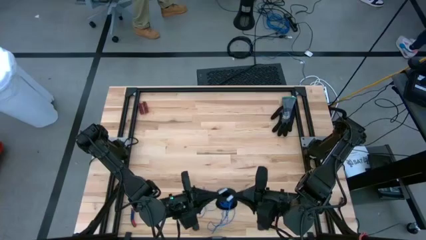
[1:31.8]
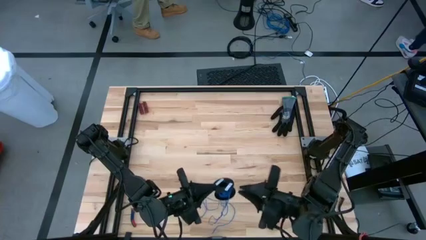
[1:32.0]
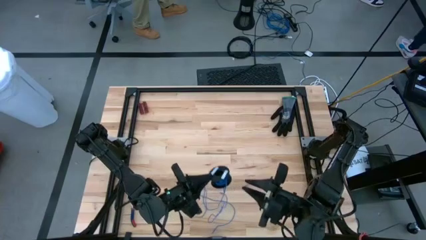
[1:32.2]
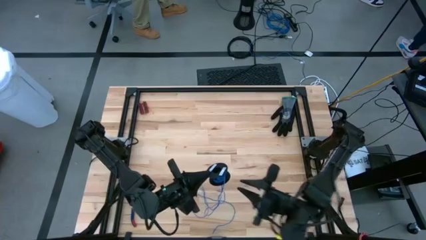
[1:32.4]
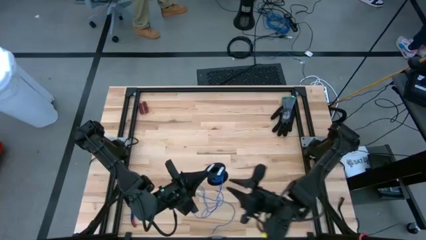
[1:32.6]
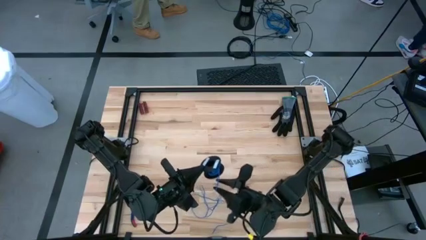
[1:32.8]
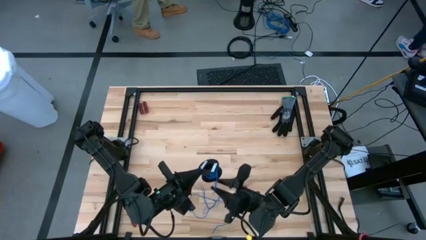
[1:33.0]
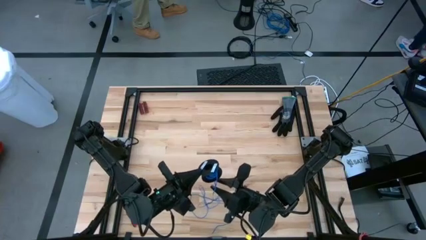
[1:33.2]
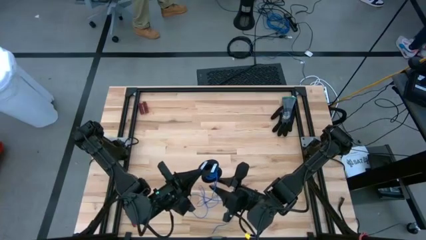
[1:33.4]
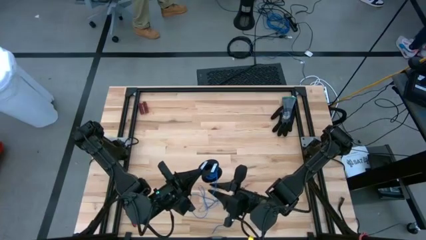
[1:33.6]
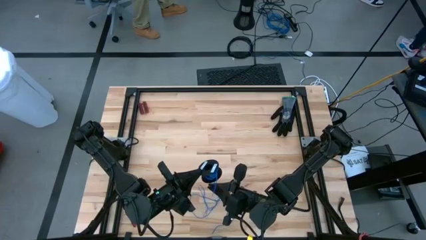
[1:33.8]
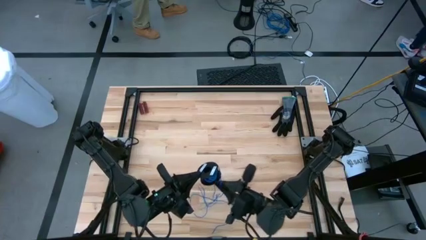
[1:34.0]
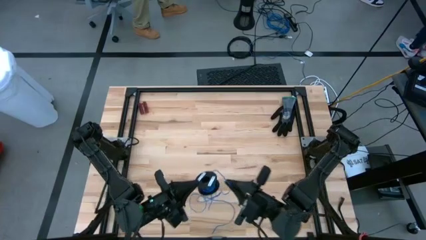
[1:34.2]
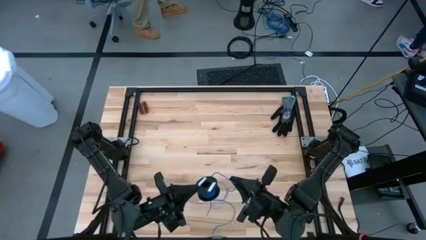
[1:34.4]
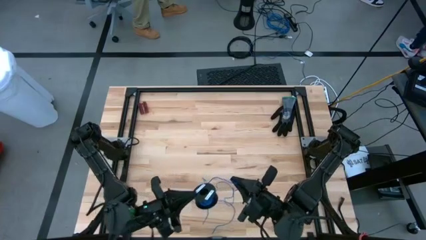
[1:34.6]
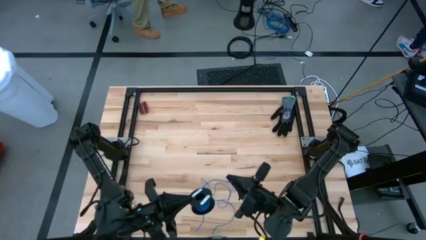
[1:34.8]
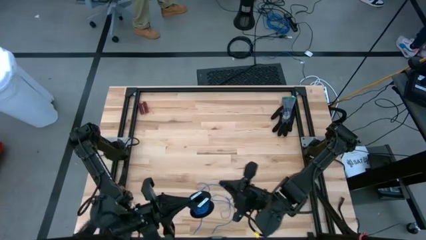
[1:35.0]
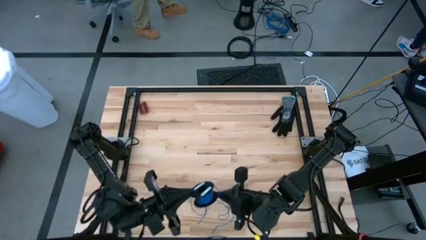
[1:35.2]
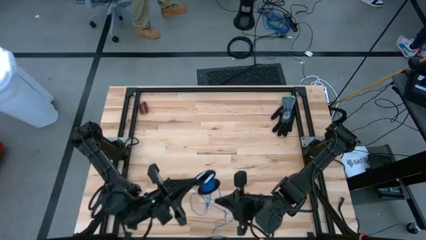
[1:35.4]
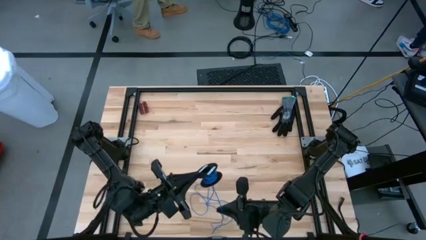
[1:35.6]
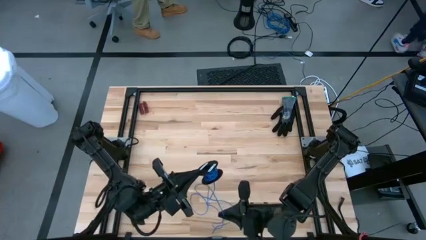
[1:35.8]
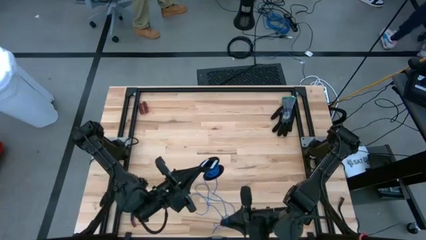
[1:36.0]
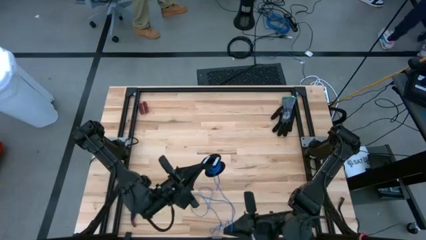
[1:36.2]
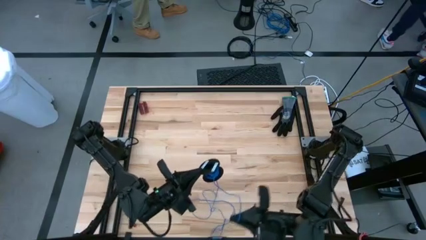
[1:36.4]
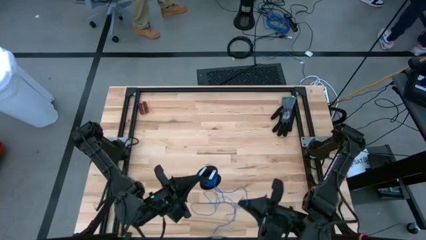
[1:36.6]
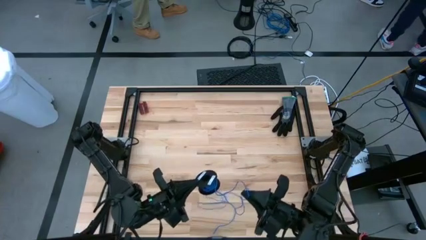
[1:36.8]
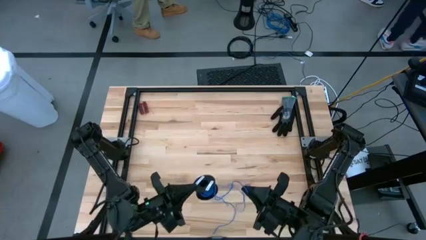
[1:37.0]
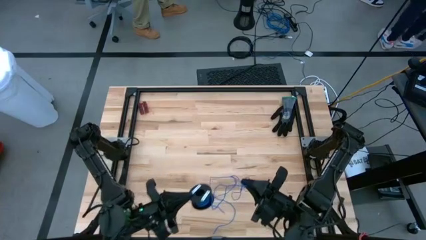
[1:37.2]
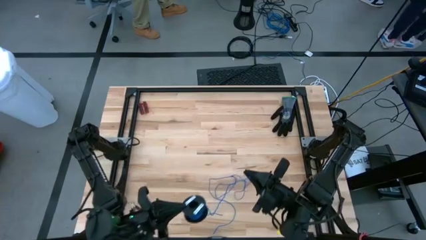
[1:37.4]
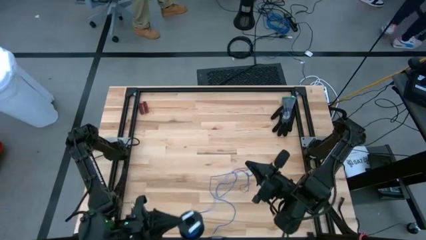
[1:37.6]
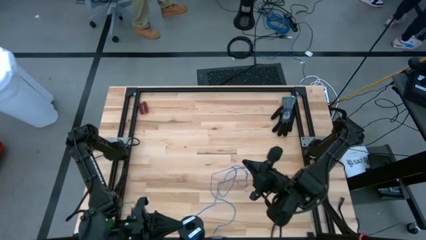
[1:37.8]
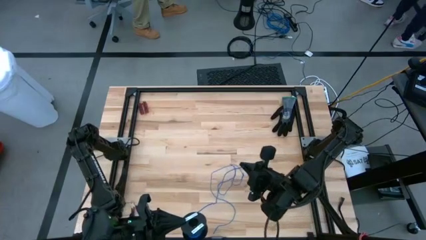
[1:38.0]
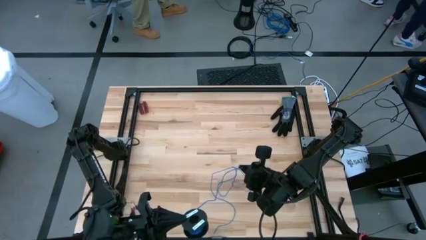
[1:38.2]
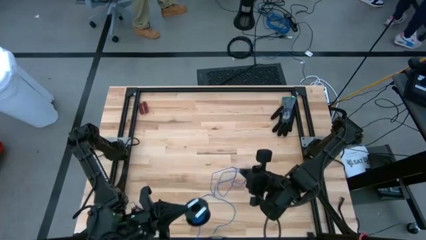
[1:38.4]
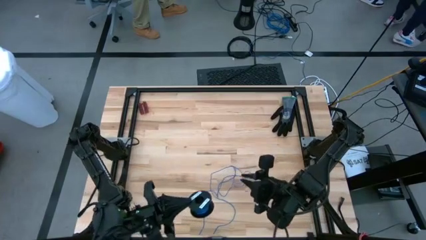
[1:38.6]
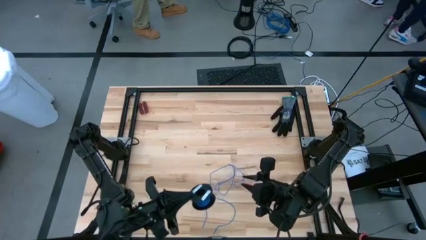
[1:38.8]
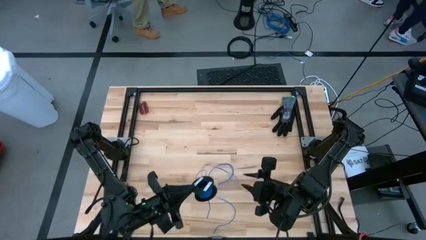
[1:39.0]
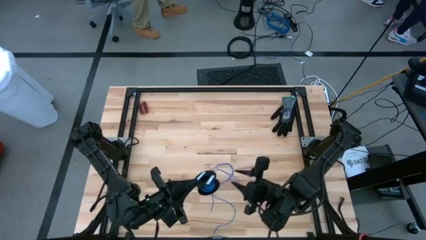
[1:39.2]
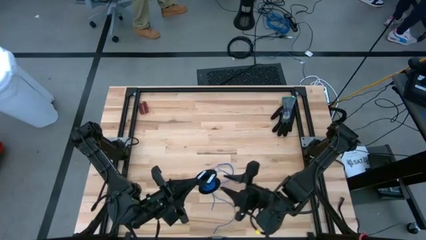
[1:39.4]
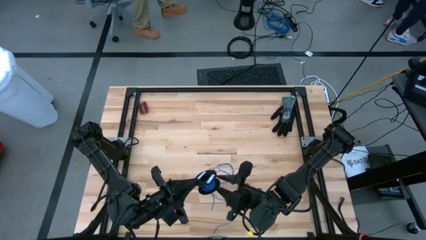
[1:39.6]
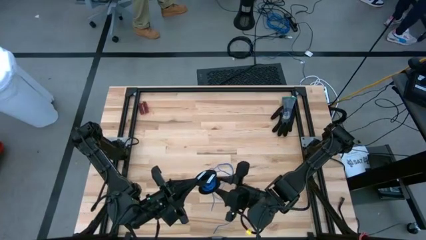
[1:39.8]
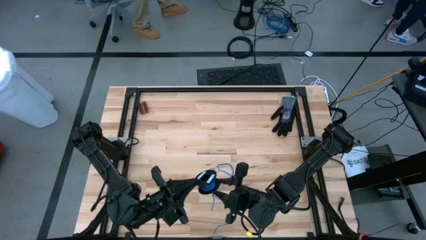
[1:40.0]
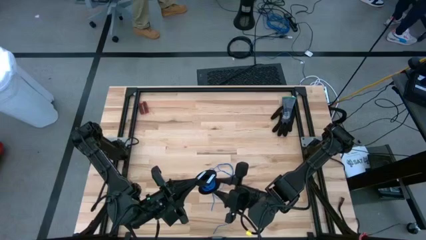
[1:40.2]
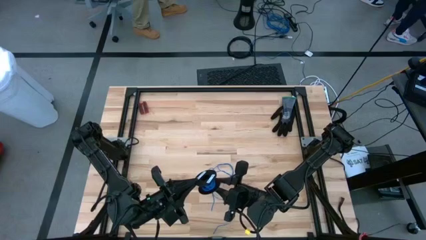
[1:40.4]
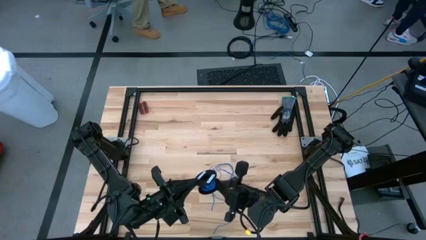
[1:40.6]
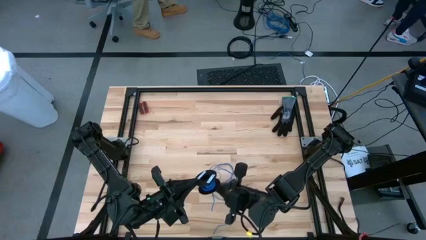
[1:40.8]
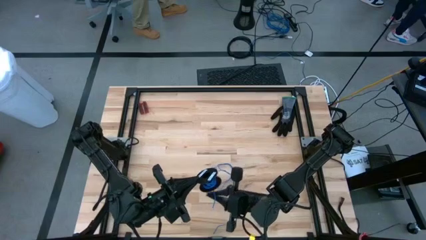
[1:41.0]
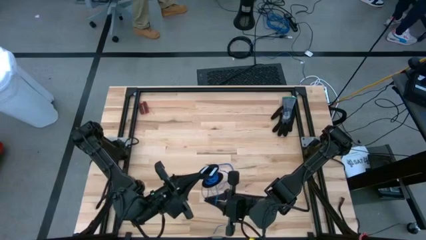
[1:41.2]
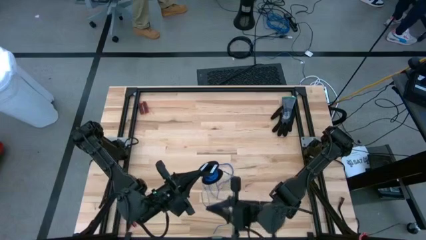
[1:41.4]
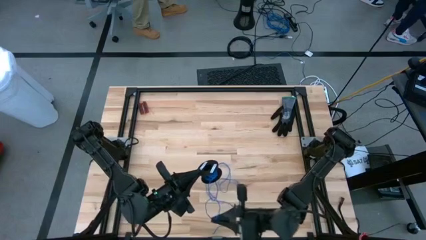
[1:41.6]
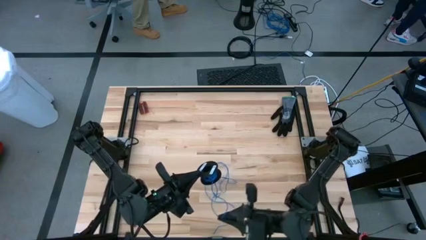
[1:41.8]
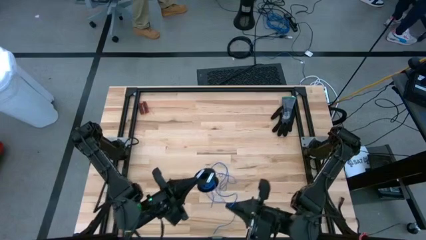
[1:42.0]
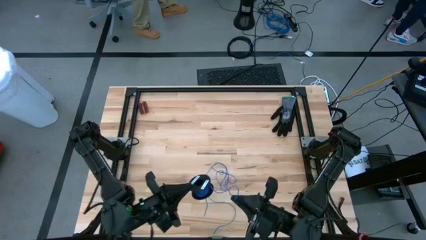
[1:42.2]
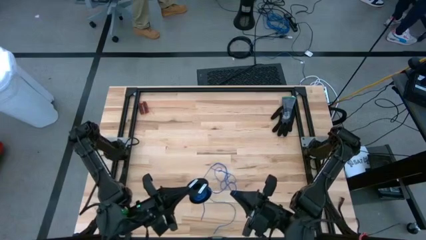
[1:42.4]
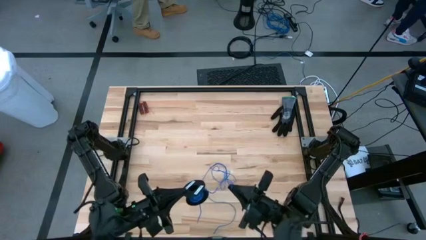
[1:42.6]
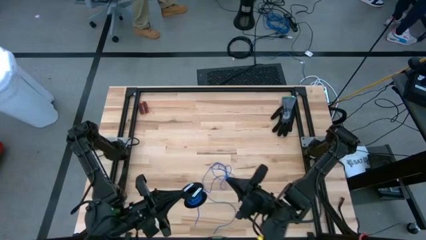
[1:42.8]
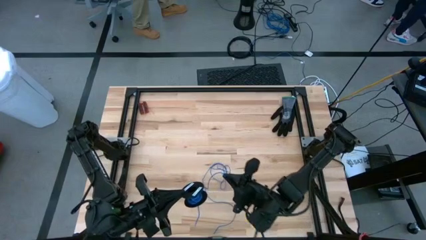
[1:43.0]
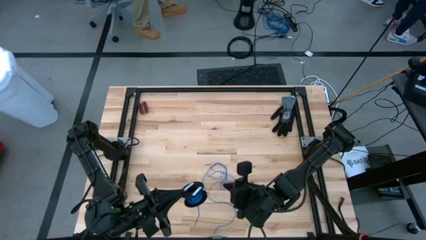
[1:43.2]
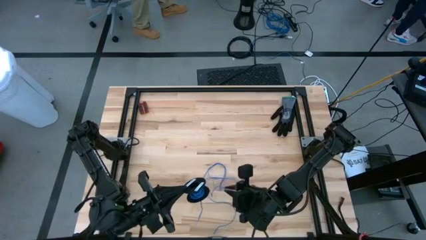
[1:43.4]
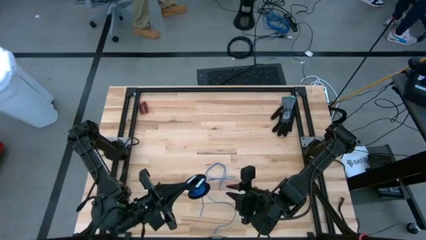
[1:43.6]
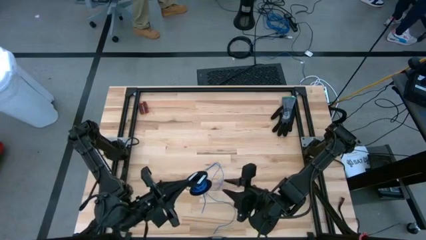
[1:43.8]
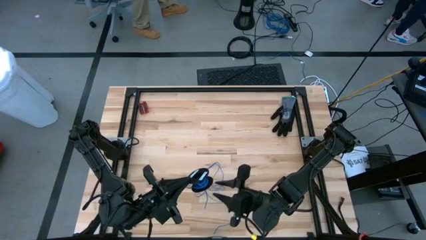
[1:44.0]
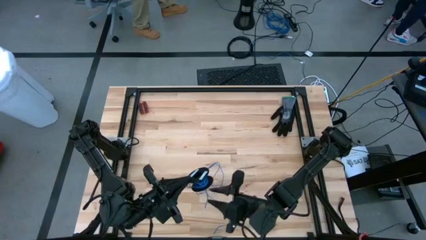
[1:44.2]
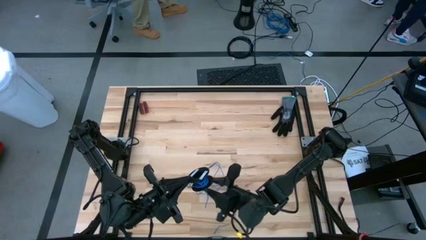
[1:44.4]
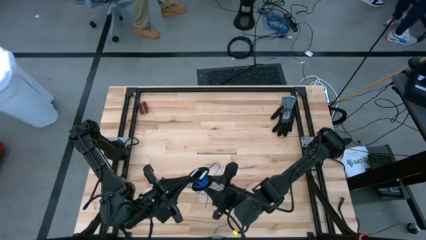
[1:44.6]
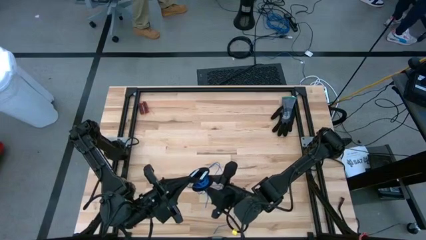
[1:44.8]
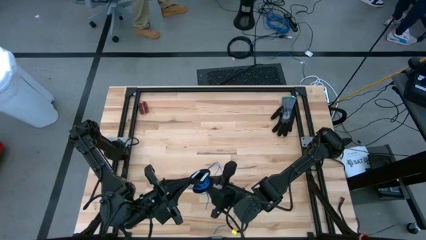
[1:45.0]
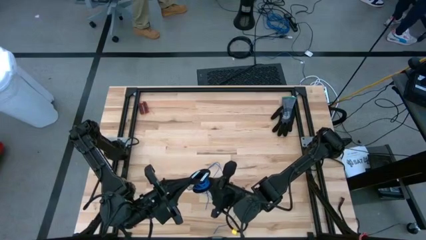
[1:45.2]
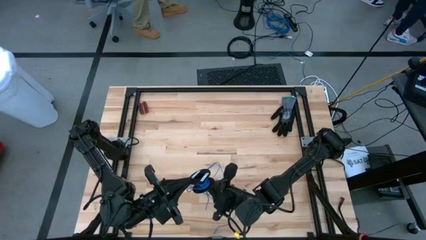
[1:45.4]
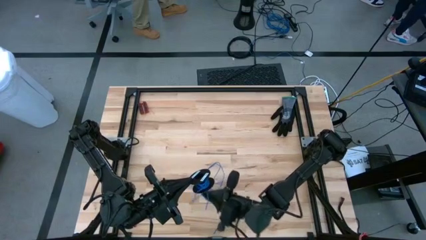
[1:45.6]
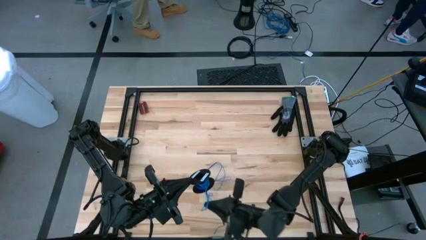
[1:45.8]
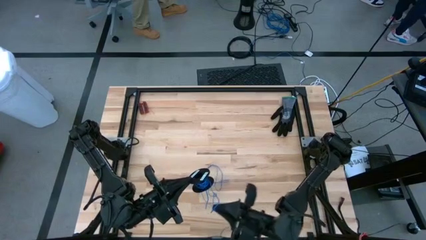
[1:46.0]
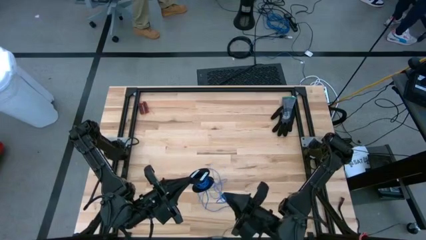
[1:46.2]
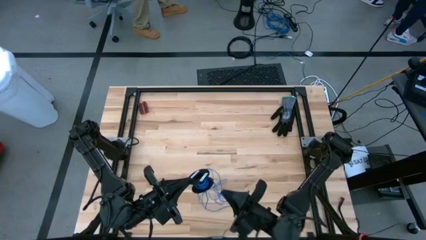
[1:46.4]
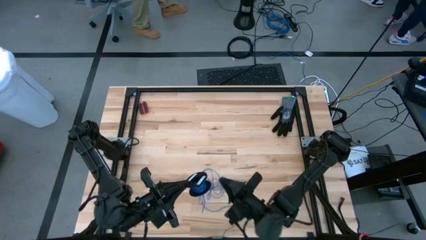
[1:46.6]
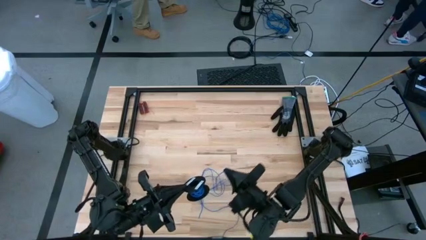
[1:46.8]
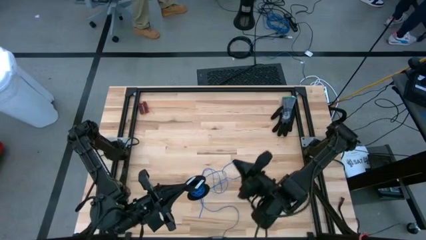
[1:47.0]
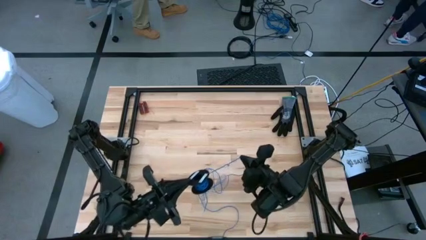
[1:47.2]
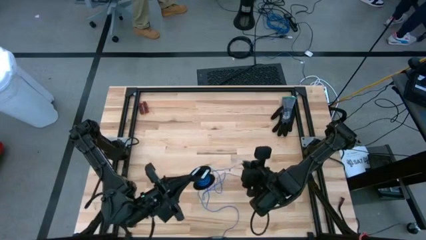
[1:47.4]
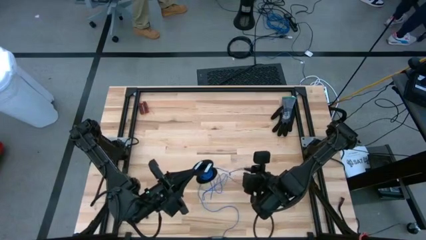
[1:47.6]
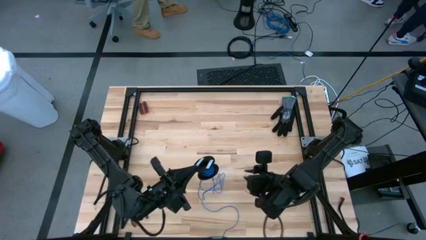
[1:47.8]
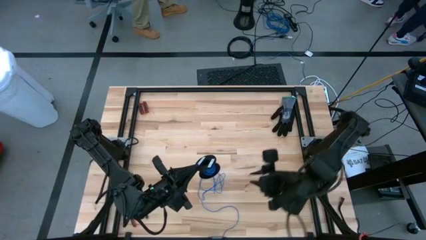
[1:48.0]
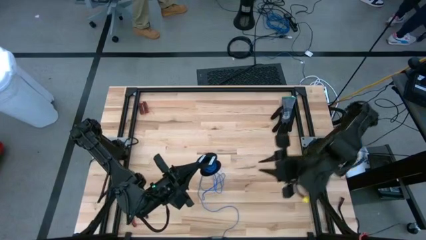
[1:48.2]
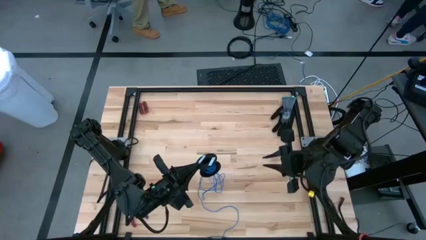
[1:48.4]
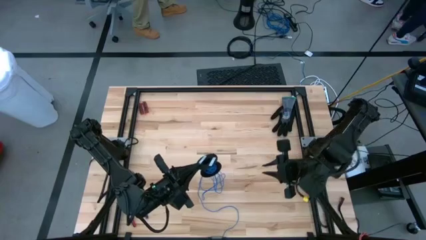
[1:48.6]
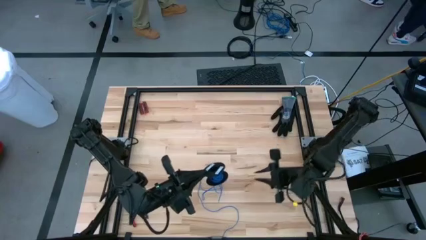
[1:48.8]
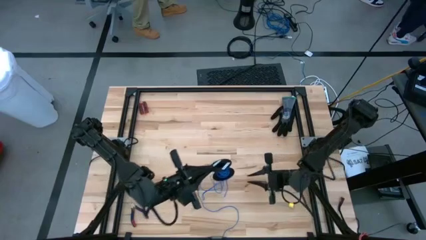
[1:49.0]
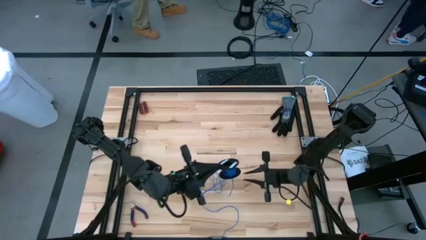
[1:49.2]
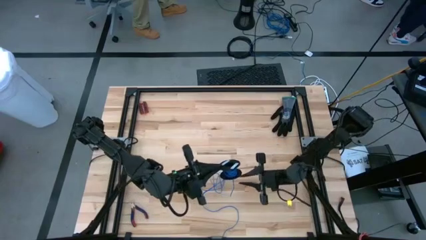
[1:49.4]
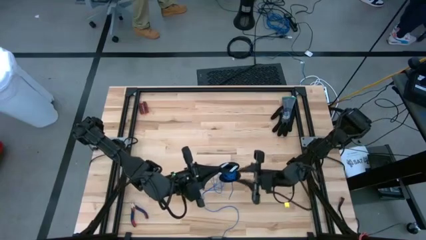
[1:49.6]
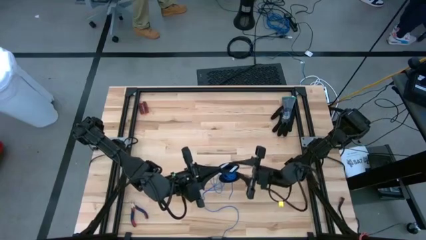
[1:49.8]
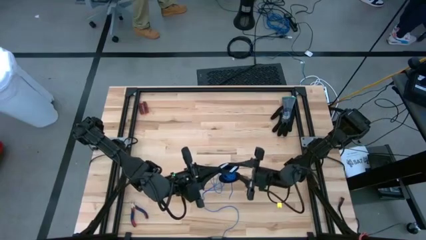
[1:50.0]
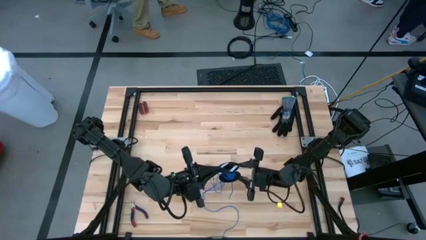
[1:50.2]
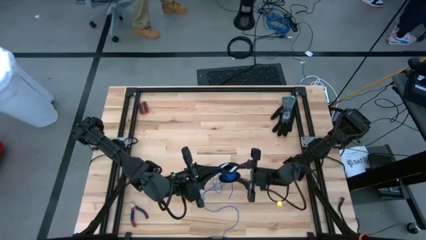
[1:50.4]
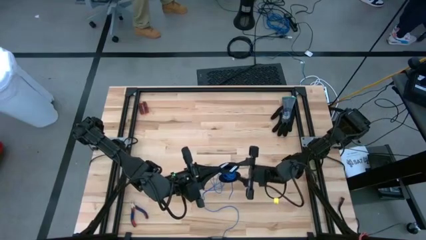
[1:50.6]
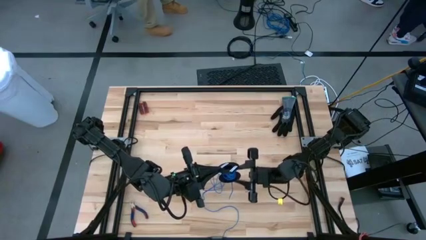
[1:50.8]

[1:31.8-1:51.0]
Task: Coil cords
Uncoil the blue wire from the spool
